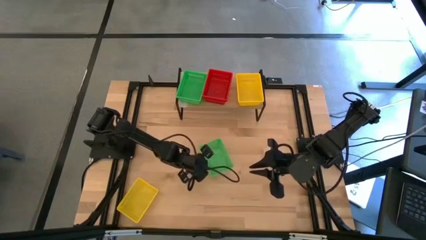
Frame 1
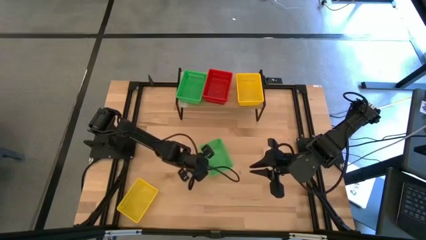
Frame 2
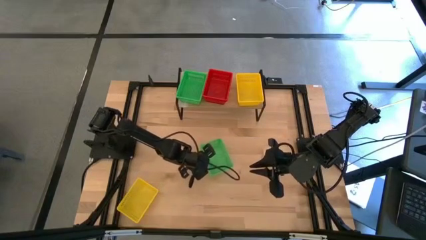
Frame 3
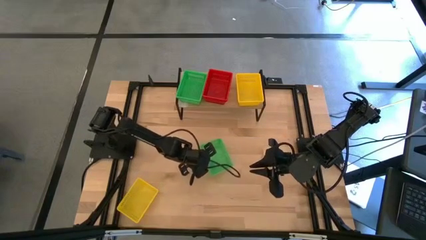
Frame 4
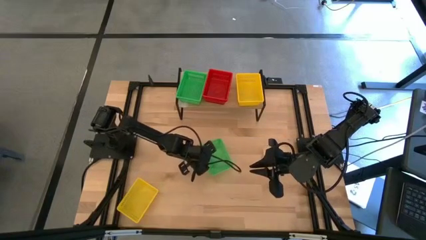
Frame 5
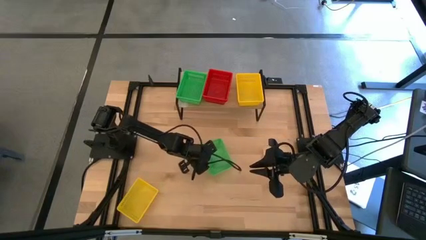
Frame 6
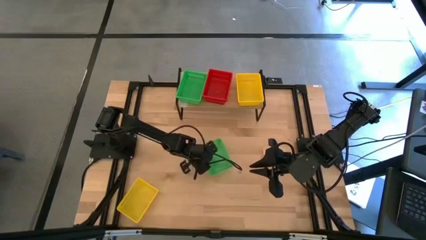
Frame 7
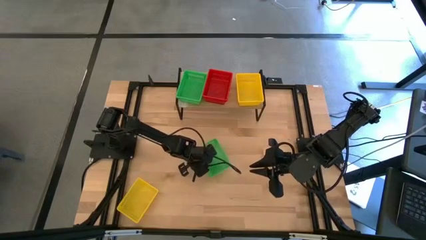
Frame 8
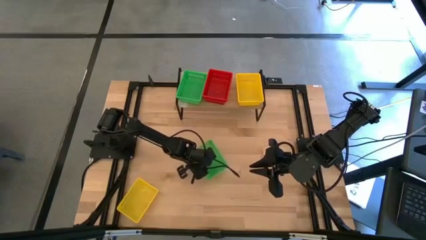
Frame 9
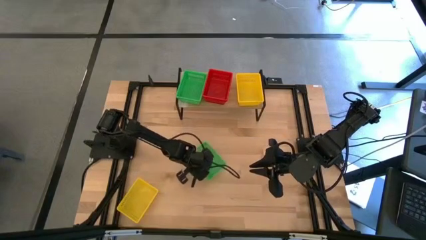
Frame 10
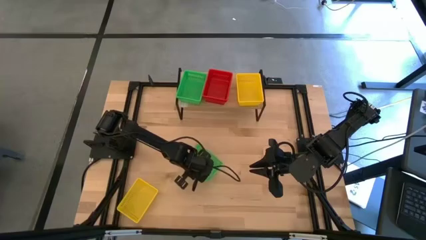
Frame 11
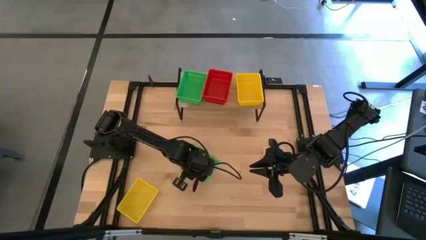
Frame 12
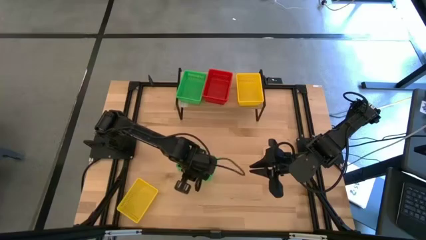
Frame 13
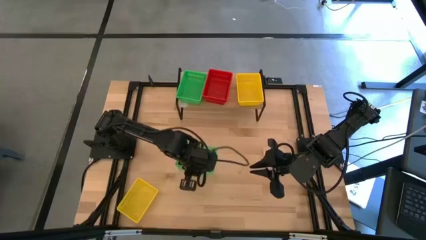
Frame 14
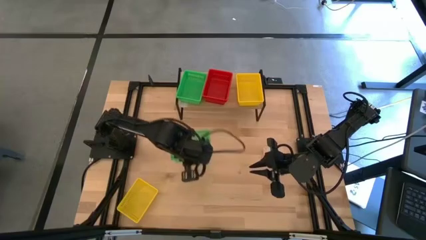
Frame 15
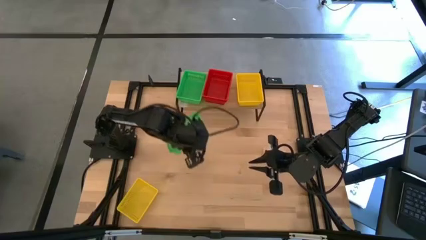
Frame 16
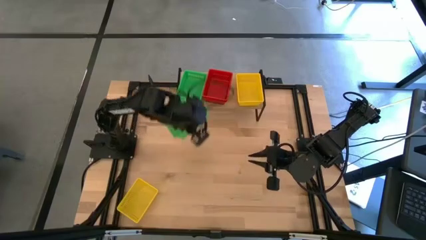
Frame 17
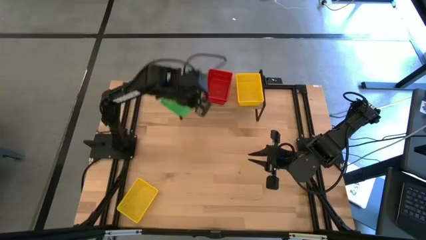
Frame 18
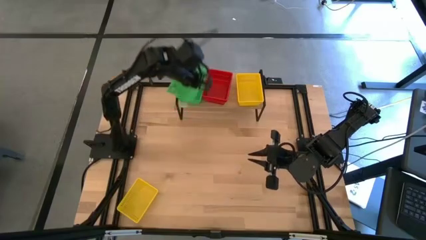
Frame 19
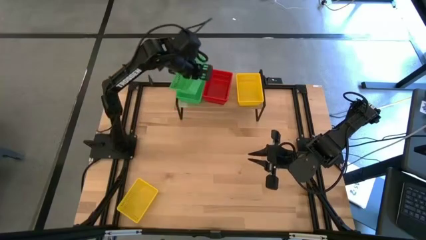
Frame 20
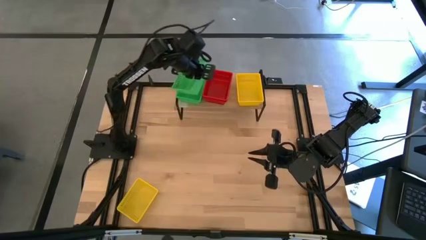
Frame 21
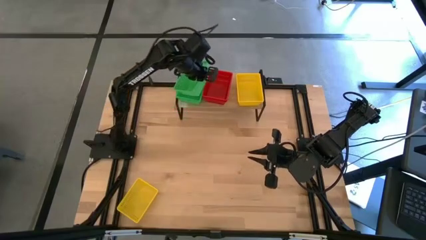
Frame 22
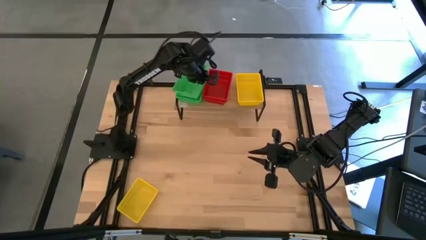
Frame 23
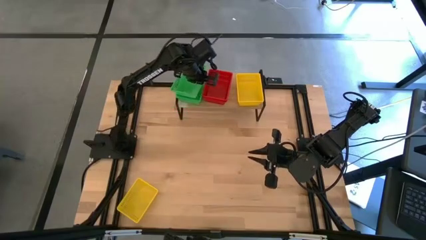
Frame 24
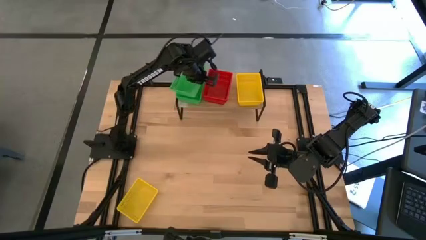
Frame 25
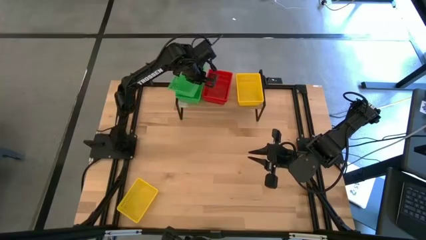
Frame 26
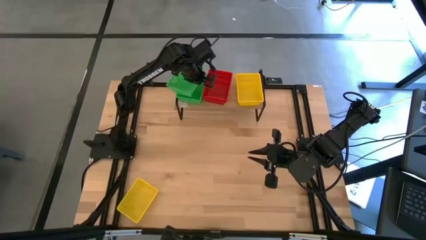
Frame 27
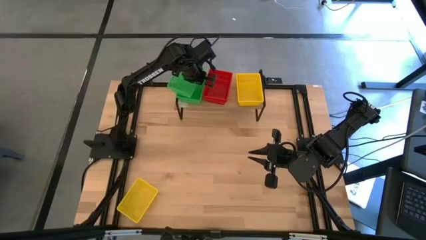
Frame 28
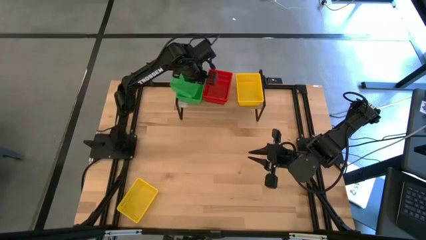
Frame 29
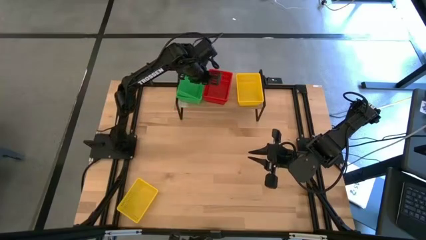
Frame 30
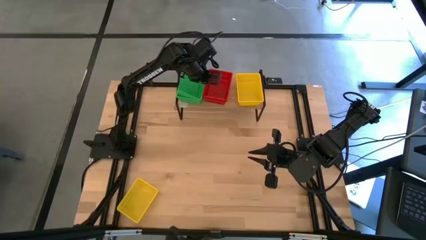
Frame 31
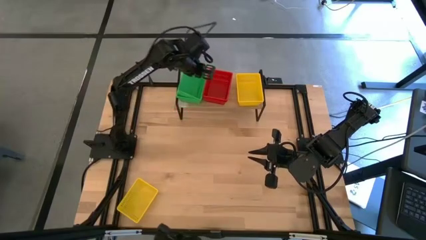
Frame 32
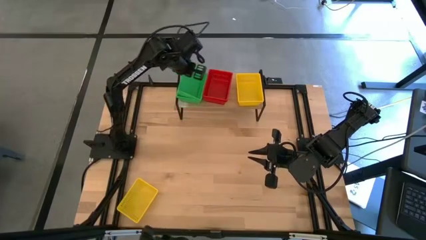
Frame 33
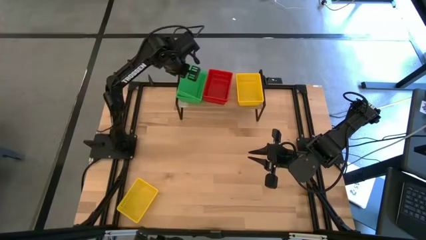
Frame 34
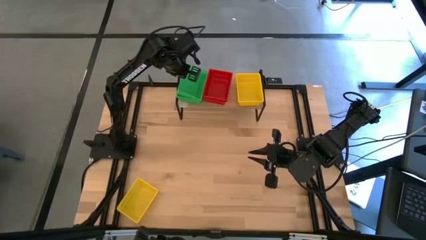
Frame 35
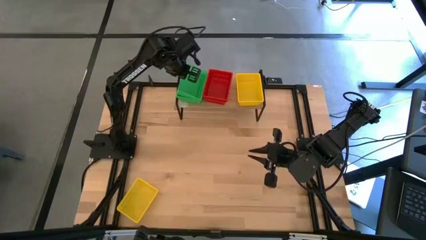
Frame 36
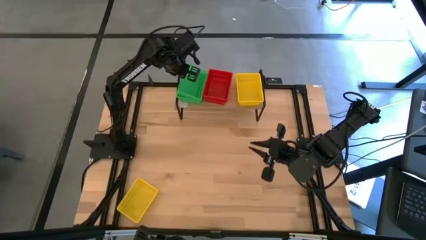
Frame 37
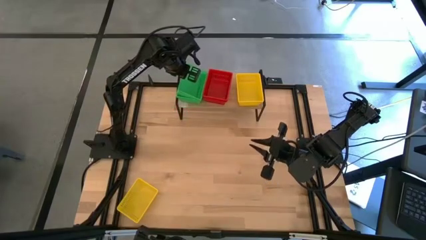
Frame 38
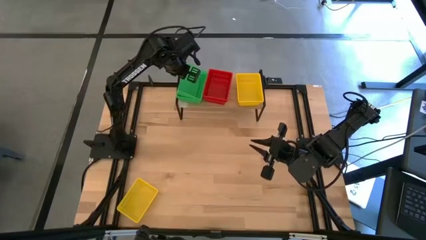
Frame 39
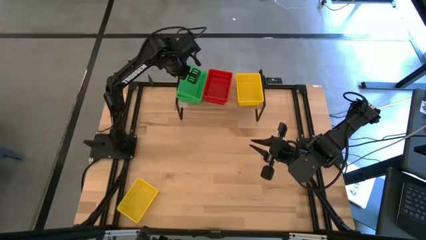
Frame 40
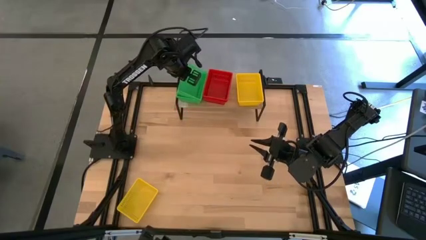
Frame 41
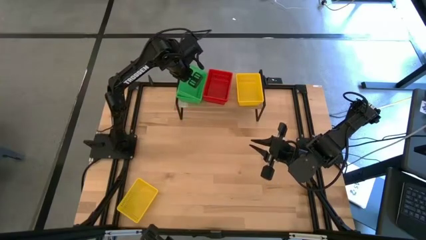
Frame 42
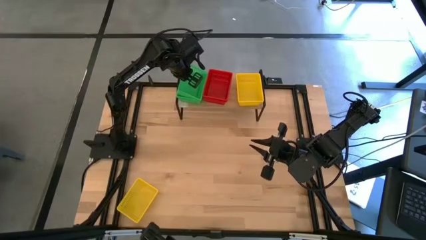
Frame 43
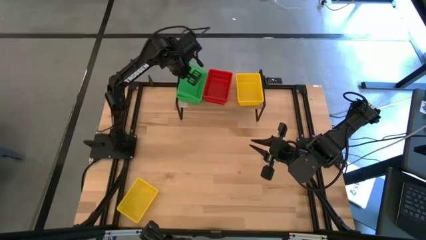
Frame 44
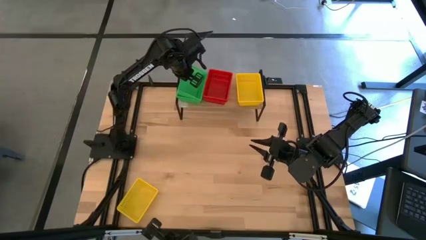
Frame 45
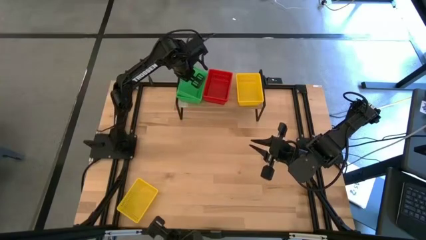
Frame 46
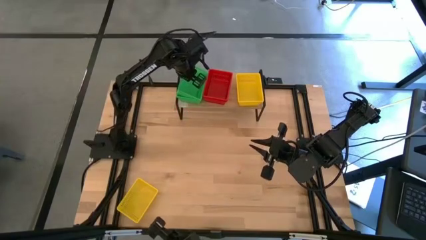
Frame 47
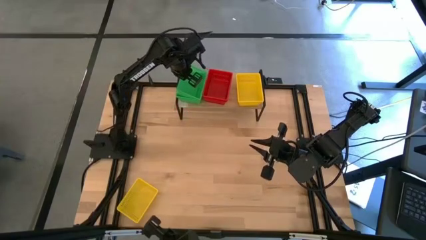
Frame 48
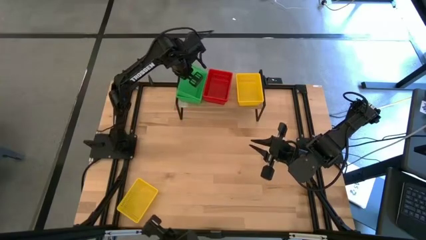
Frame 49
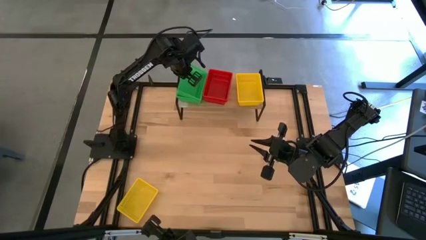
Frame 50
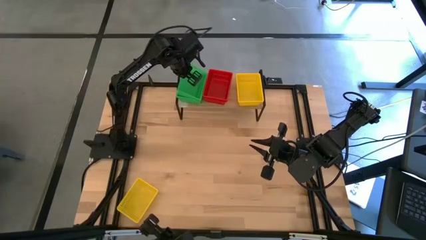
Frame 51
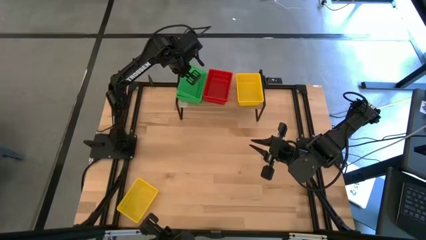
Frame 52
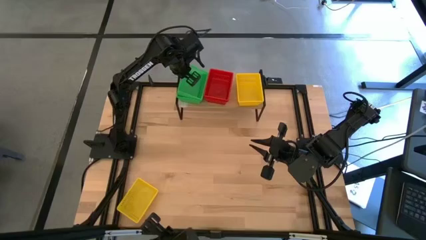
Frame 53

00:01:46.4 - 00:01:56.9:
Task: Stack baskets on shelf by color
Stack the green bin on top of the green bins on the shelf

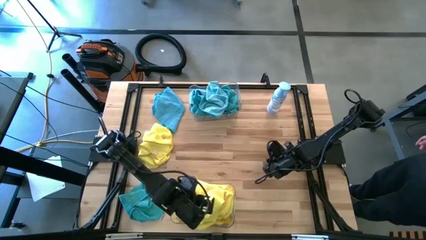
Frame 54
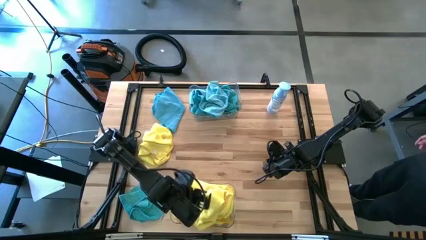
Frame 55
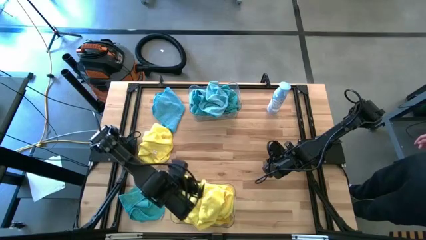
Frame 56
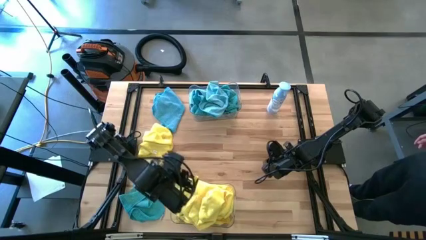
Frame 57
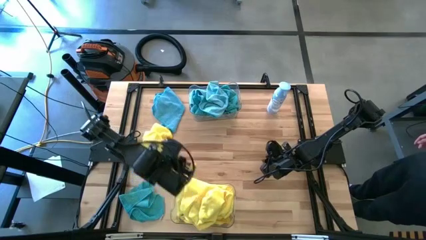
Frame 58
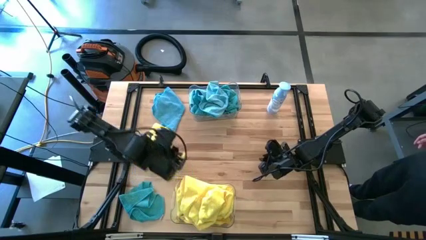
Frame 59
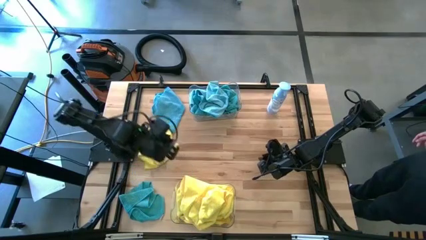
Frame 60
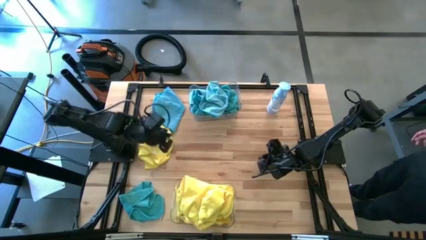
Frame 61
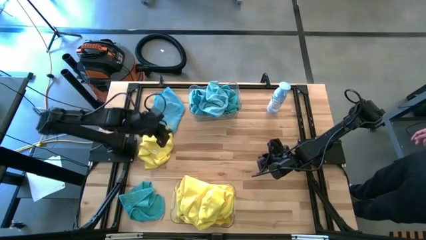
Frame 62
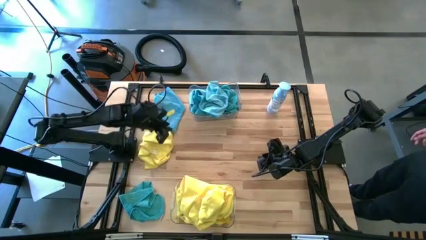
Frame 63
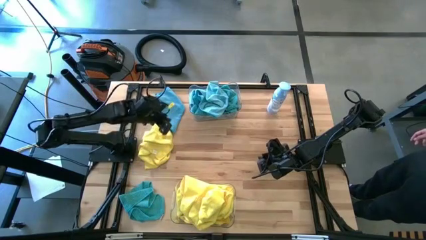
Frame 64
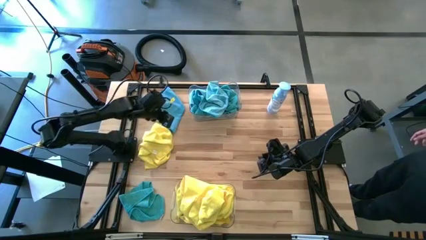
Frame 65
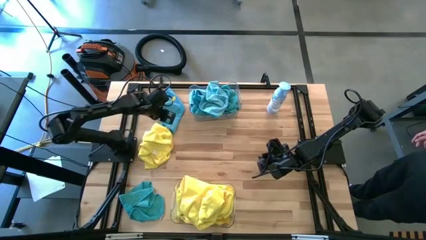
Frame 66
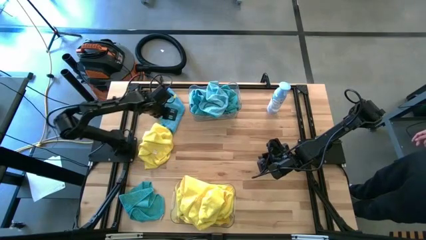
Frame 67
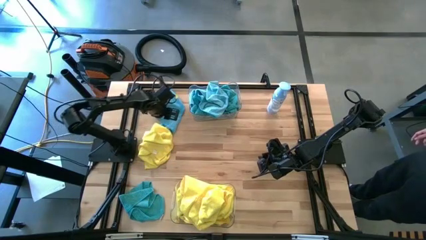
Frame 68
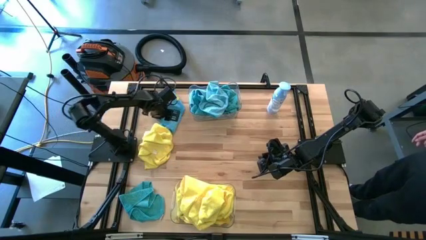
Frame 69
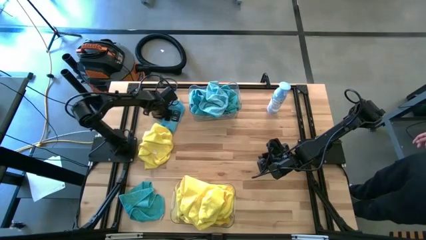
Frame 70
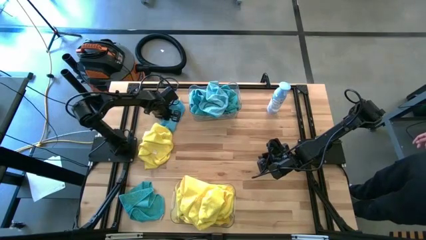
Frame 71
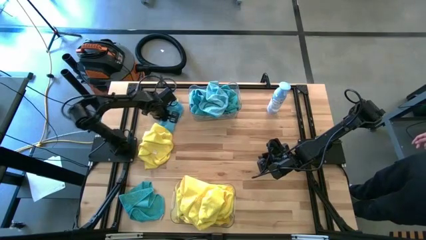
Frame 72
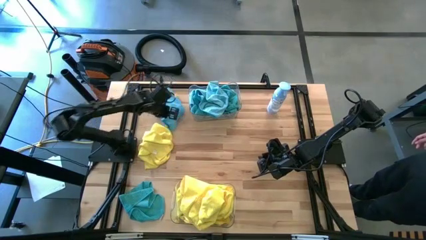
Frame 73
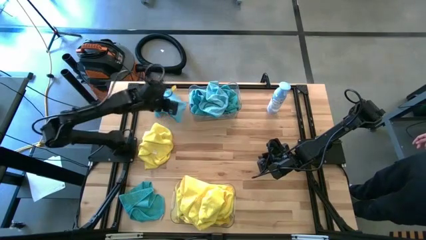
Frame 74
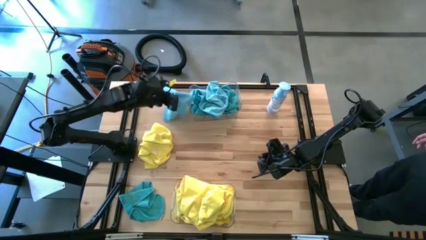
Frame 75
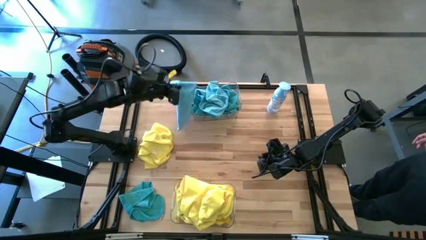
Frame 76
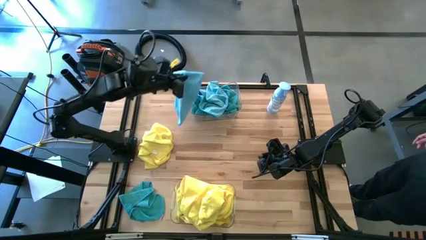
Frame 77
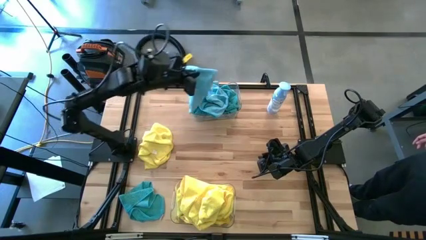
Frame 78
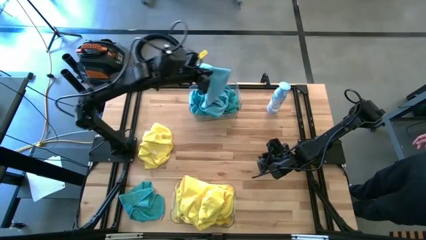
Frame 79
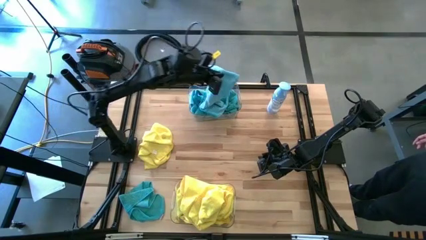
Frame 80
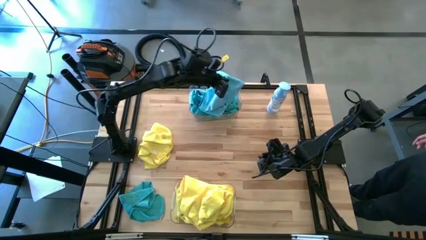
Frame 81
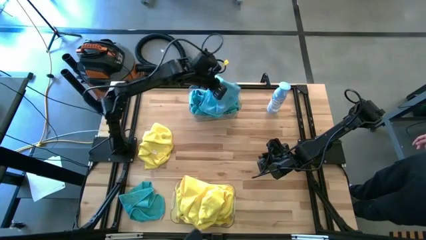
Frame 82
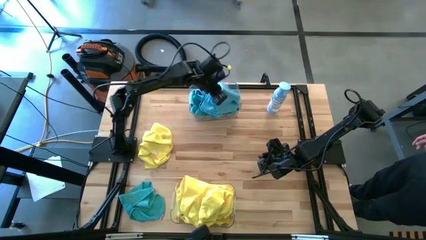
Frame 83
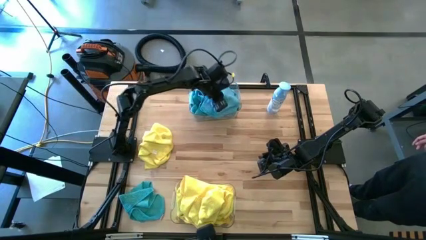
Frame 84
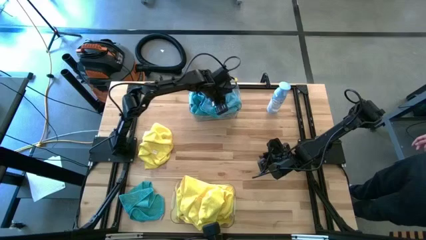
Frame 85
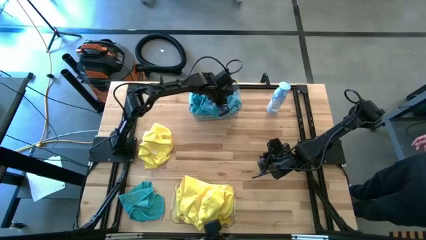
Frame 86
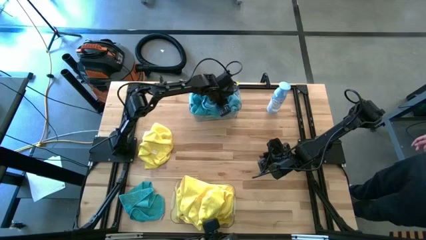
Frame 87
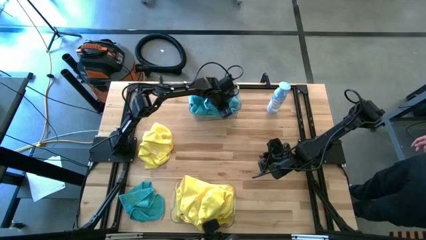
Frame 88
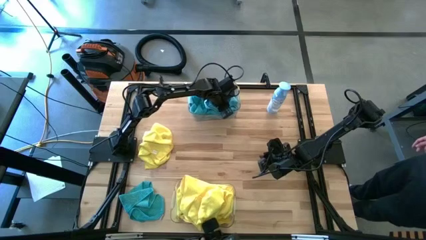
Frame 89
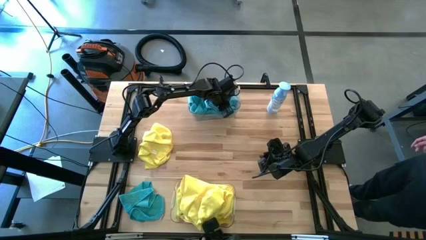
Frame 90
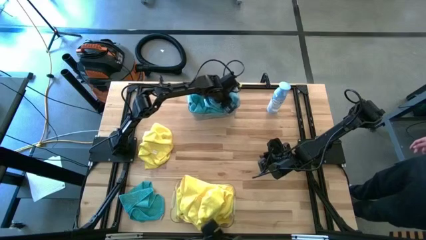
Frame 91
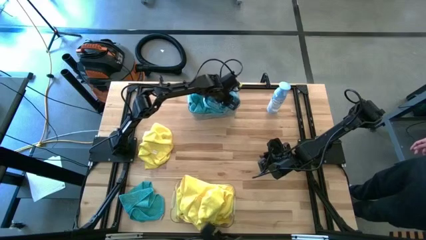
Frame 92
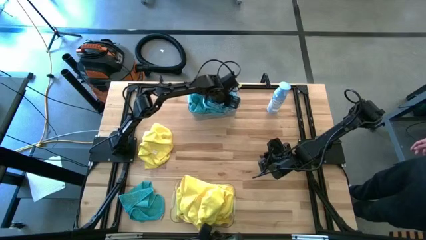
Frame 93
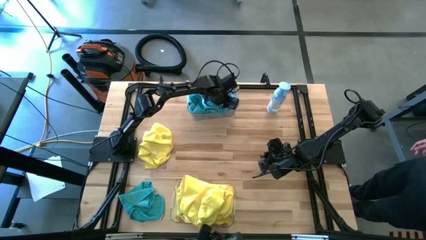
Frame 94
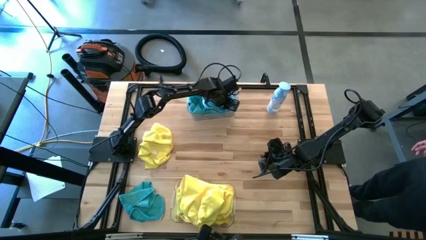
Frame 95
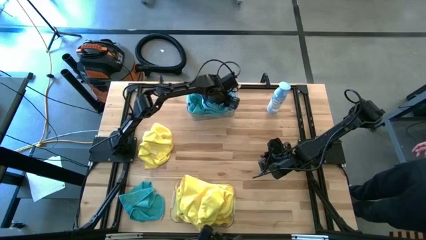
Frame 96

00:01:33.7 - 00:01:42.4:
Task: Sort microfiber towel by color & place in baskets
Put the blue microfiber towel into the top transparent bin
